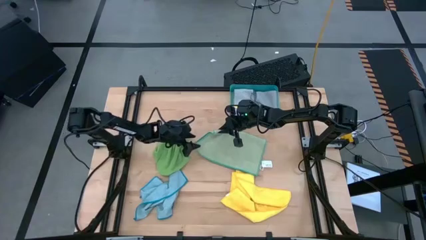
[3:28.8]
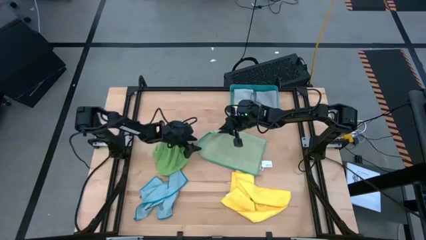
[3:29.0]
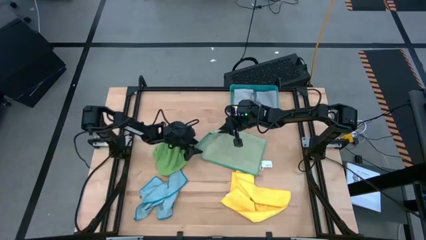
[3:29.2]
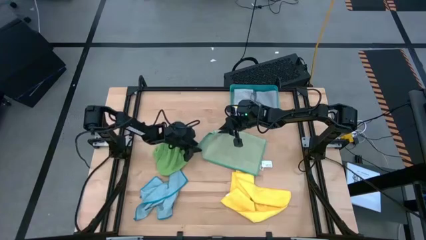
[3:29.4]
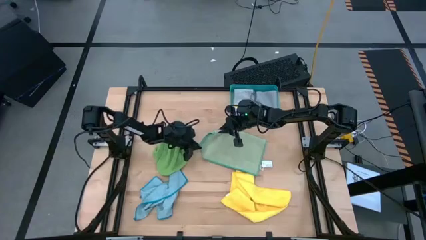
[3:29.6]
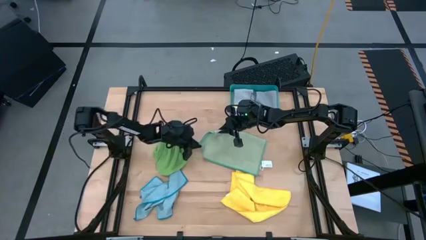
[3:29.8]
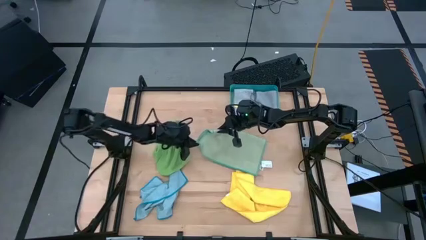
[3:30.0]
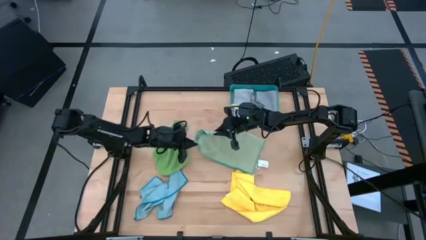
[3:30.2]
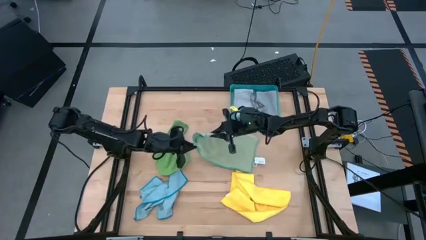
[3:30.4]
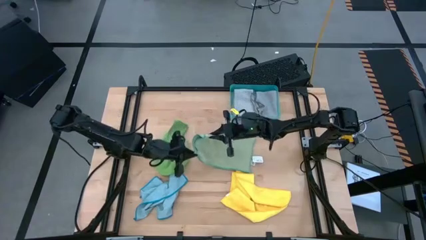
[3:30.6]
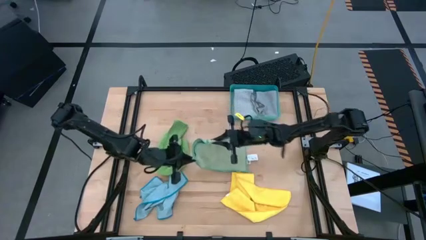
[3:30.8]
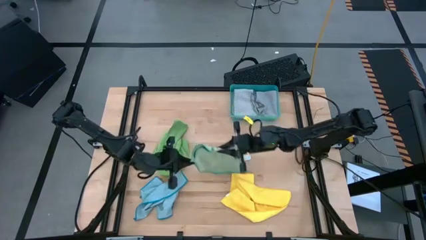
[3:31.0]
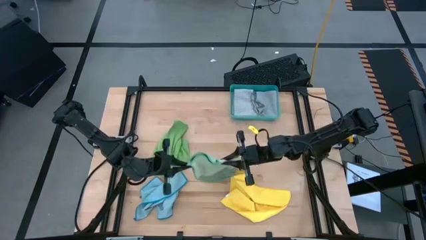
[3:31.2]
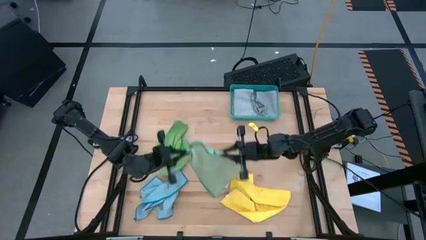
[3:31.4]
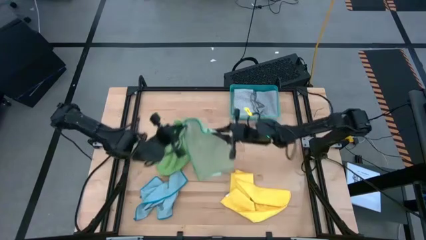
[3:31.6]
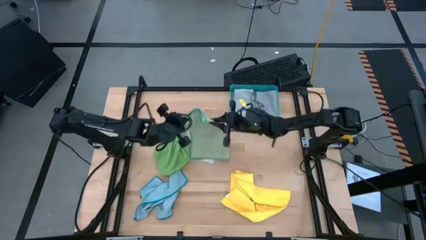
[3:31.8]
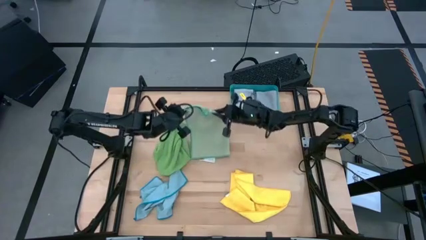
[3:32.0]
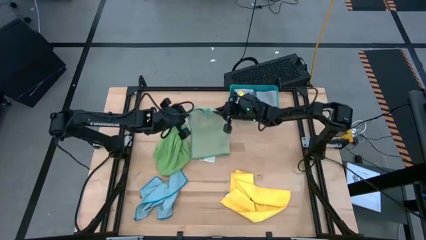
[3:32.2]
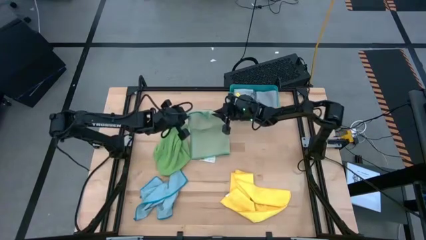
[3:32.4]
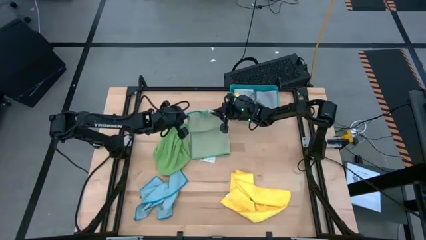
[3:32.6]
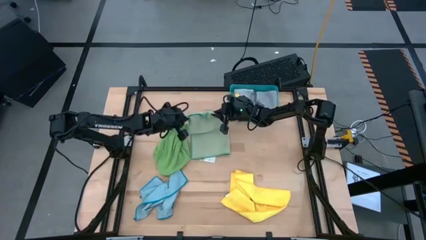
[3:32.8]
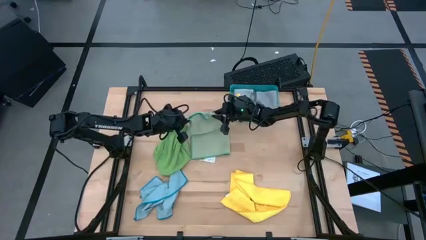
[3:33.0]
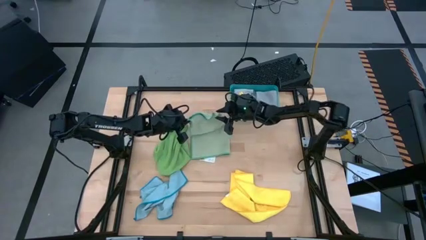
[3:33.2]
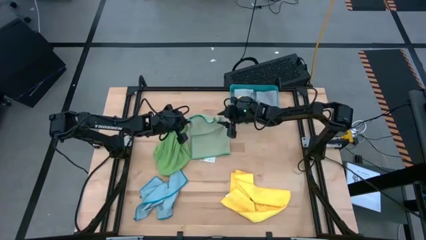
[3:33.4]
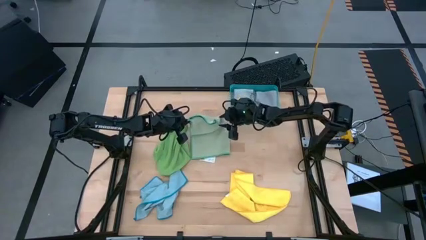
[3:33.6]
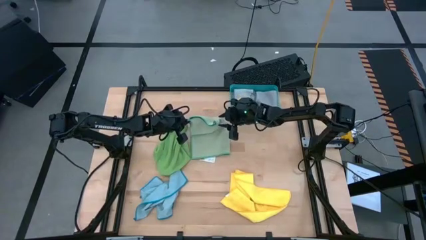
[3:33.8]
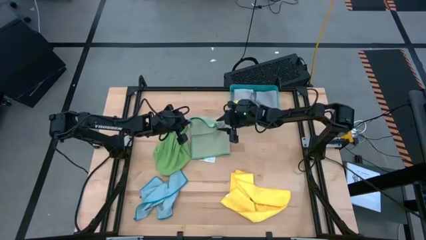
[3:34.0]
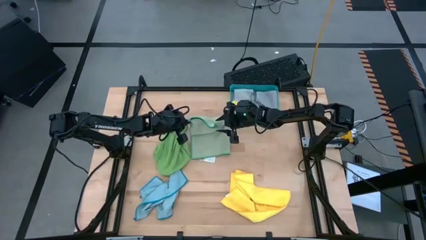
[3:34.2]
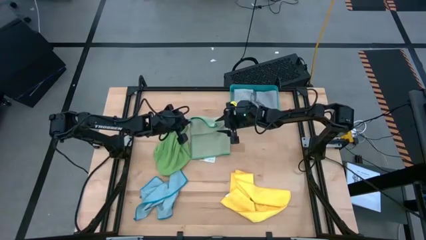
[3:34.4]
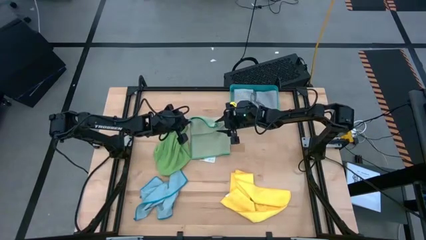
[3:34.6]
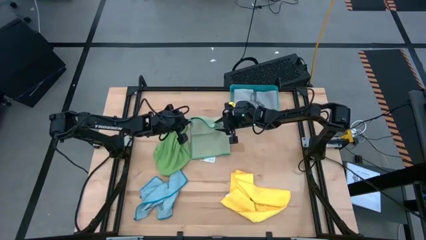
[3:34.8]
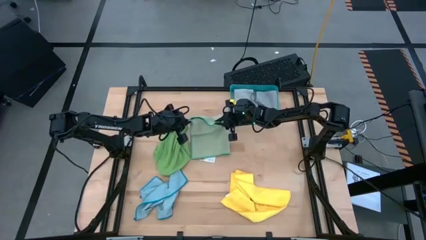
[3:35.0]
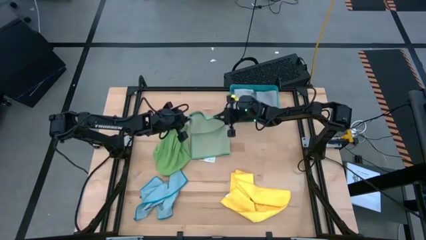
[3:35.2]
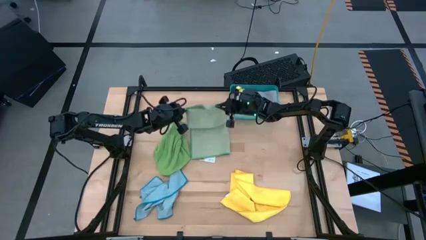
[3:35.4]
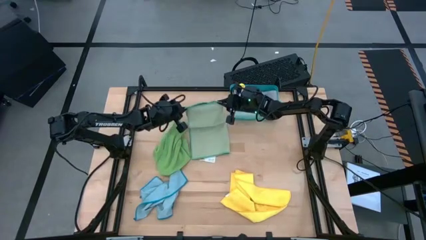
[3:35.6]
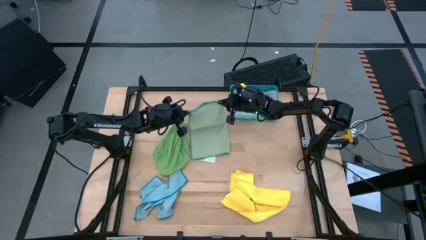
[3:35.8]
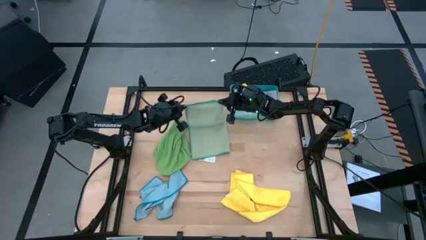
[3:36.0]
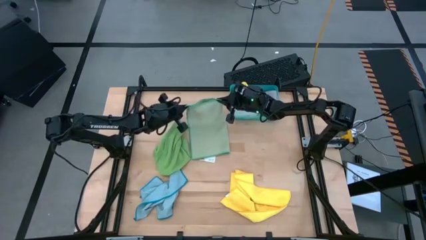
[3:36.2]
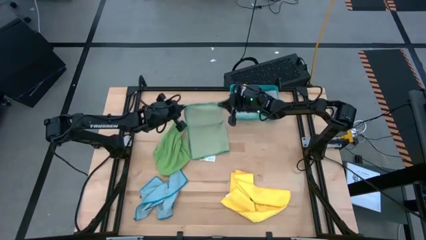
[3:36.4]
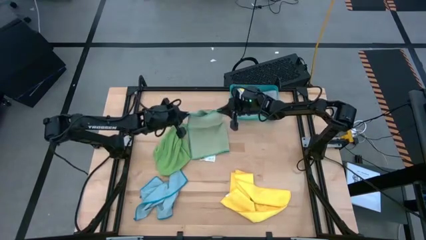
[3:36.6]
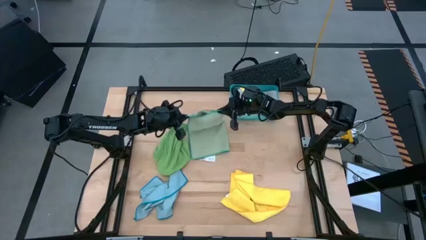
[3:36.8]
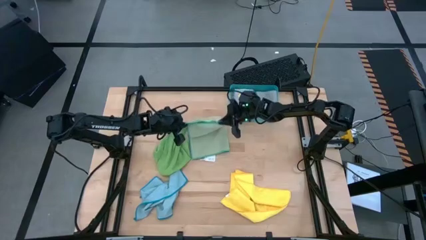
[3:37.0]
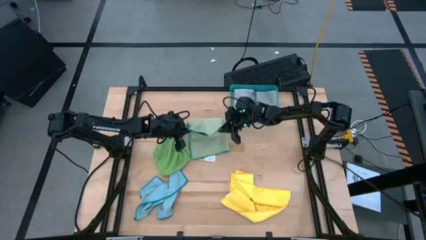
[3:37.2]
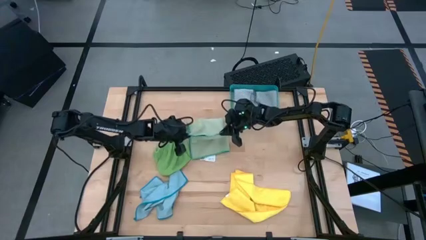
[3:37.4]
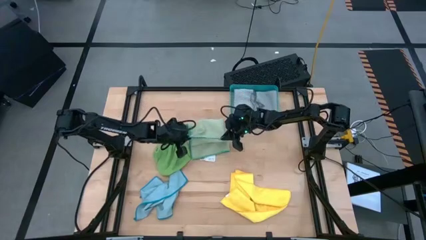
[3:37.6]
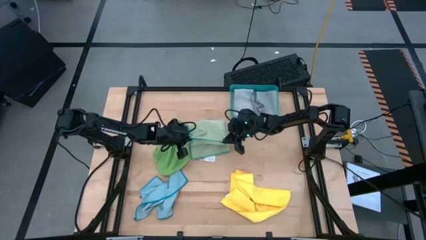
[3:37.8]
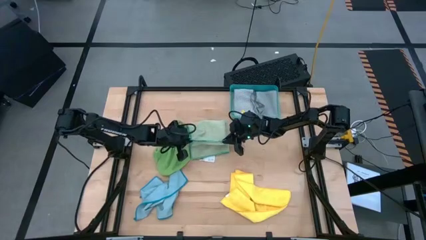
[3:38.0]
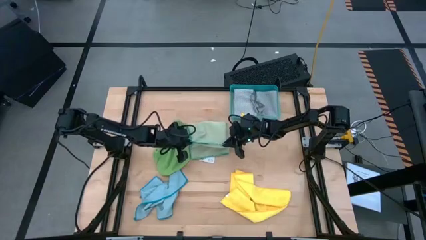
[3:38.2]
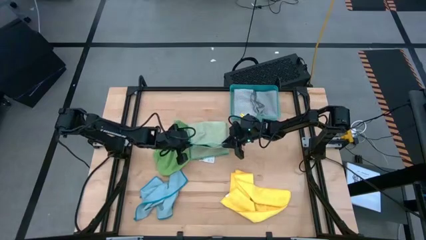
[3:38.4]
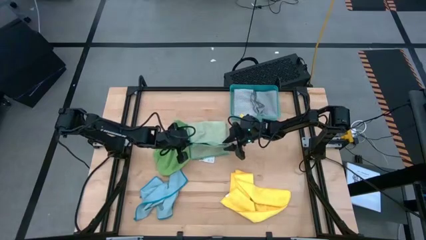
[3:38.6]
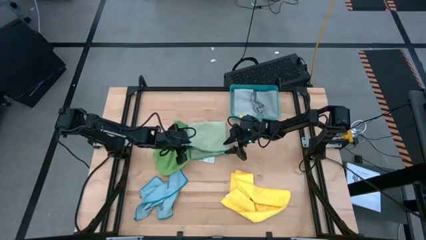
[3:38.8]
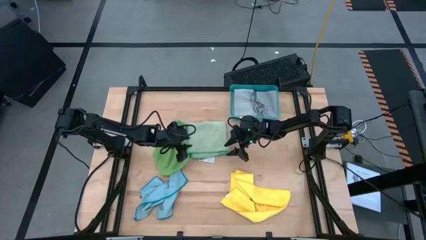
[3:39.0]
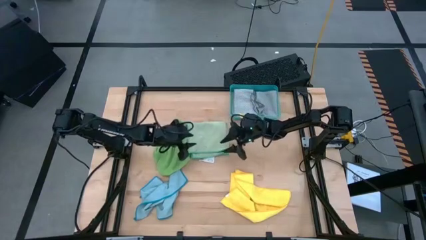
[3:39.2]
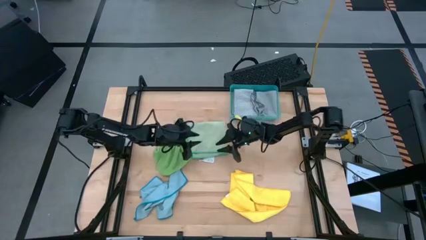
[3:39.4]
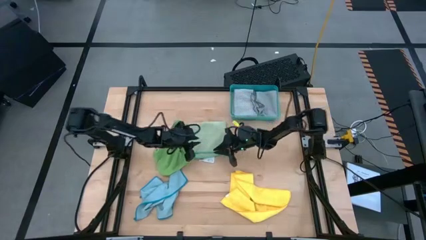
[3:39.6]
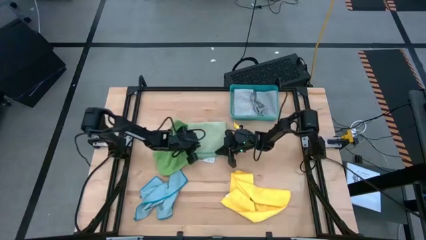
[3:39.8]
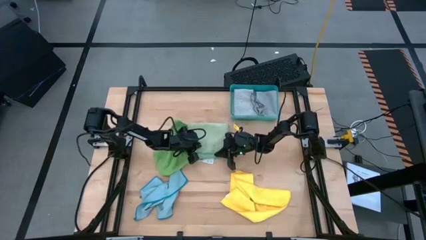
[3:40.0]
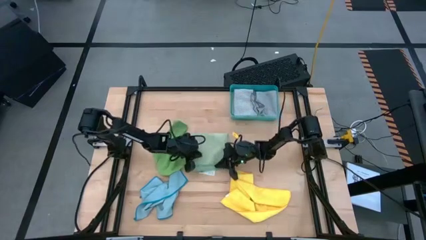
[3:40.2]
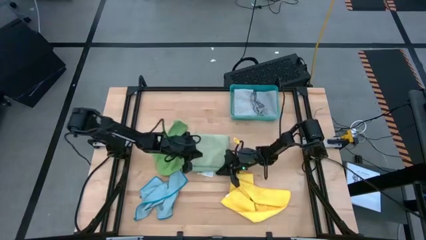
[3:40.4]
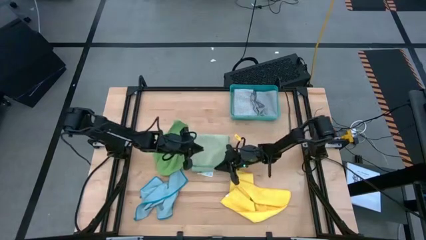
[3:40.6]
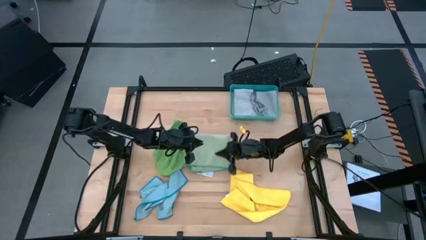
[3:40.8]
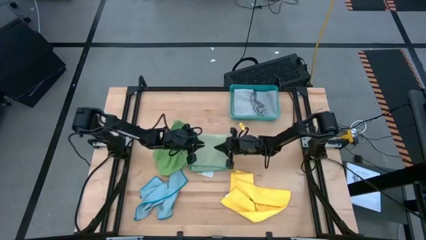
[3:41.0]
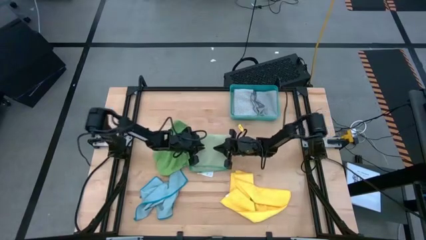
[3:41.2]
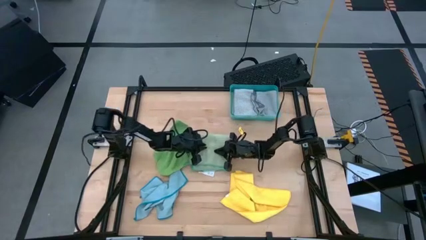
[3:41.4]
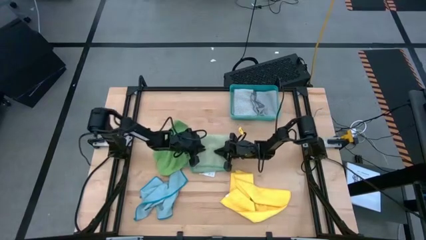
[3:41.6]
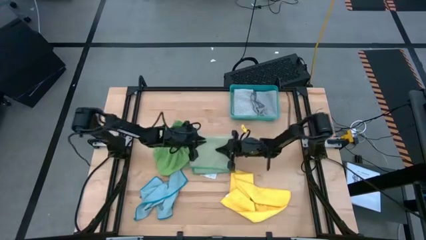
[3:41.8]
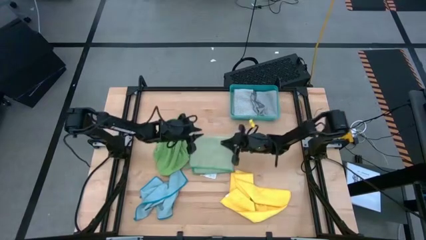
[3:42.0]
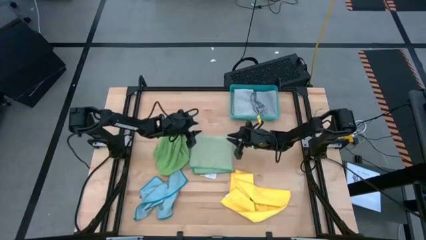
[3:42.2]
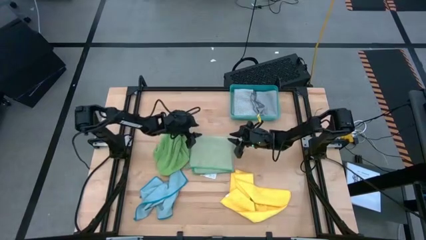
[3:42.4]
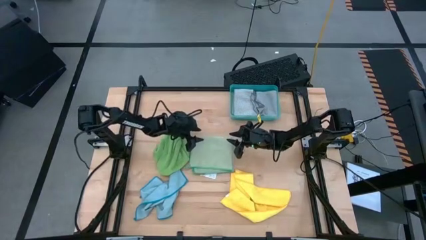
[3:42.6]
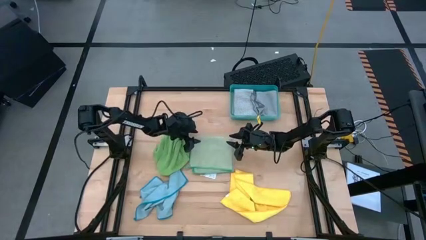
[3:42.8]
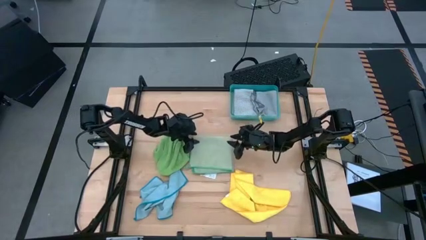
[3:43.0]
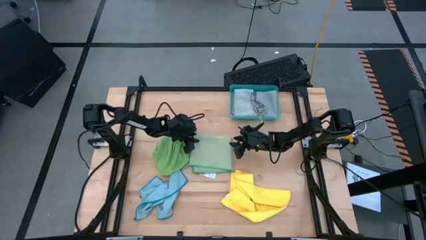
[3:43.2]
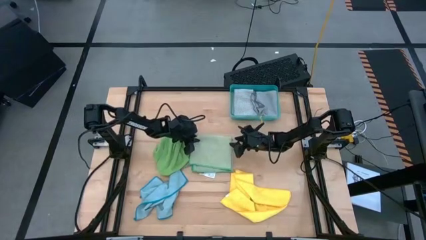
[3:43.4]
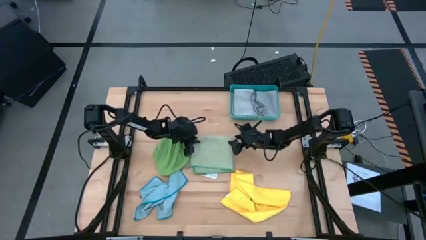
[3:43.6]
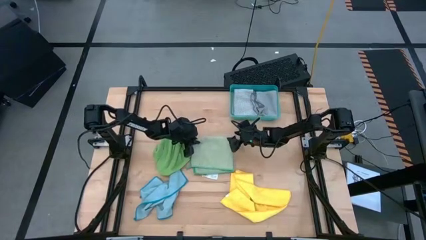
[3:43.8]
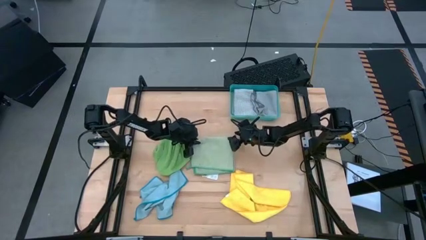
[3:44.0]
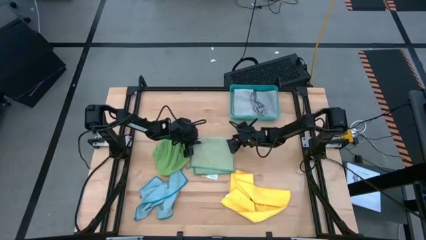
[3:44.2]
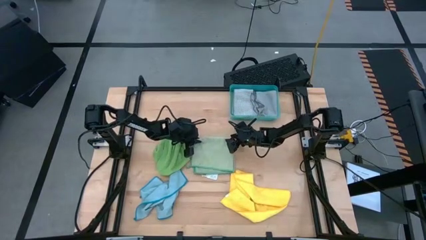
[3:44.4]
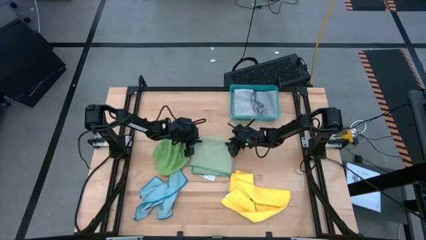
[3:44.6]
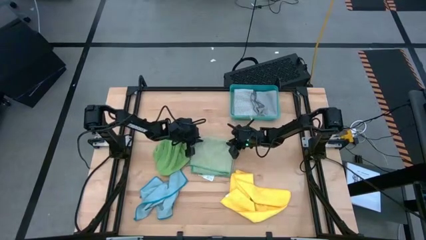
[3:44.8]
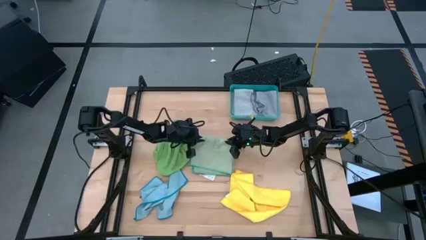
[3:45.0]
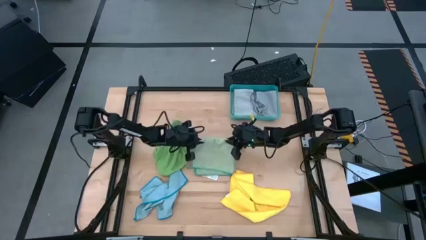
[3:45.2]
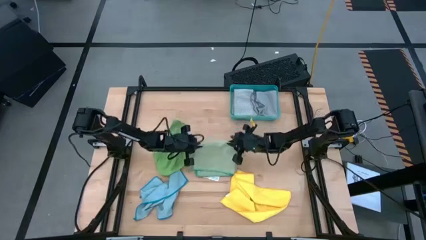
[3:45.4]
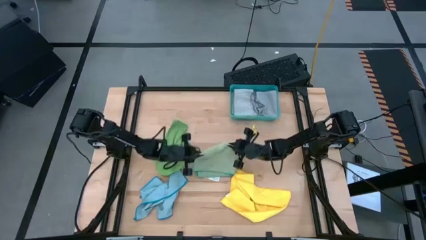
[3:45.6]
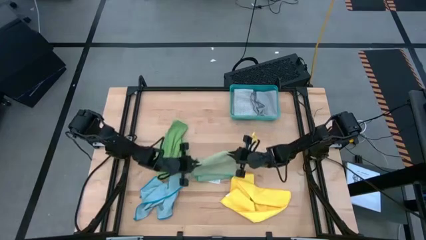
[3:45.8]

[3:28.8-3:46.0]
Task: Fold microfiber towels
Fold the light green microfiber cloth
